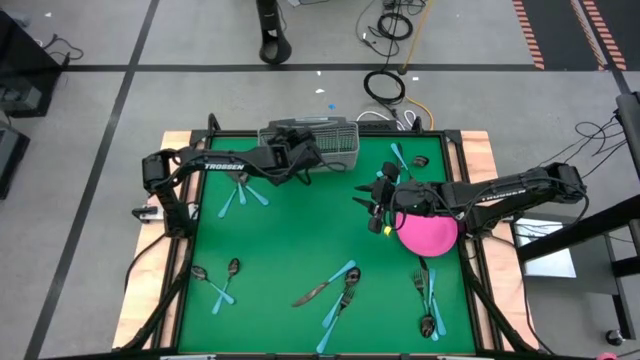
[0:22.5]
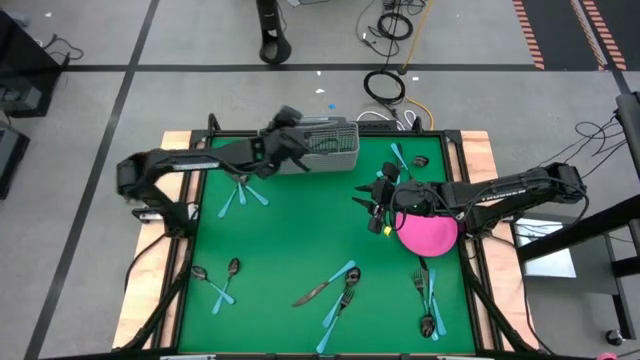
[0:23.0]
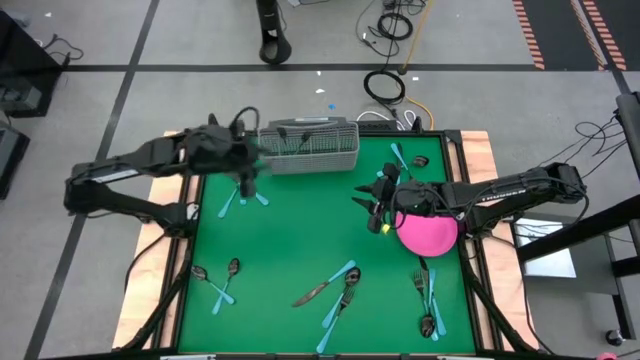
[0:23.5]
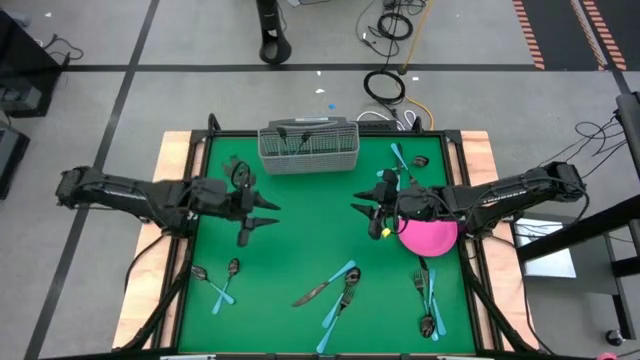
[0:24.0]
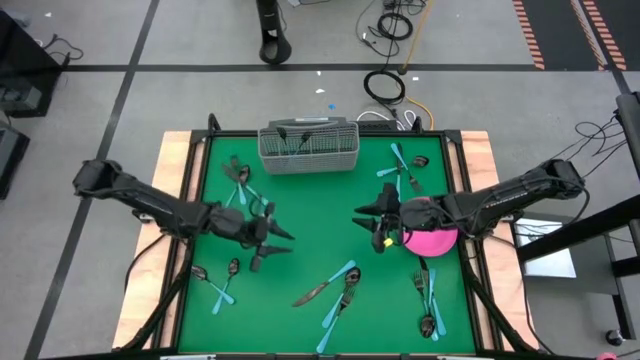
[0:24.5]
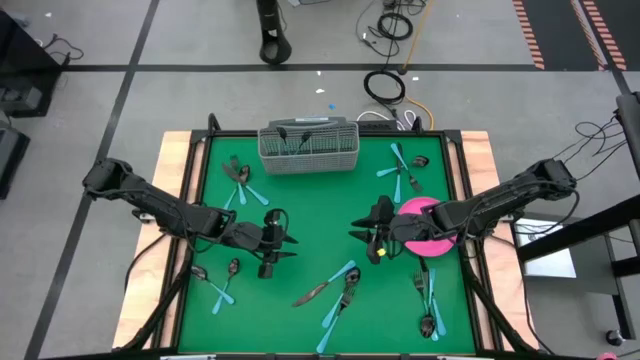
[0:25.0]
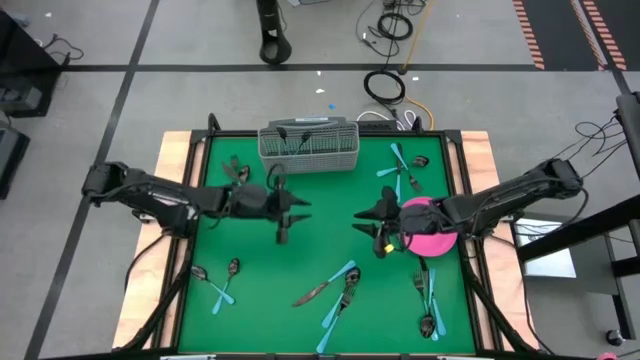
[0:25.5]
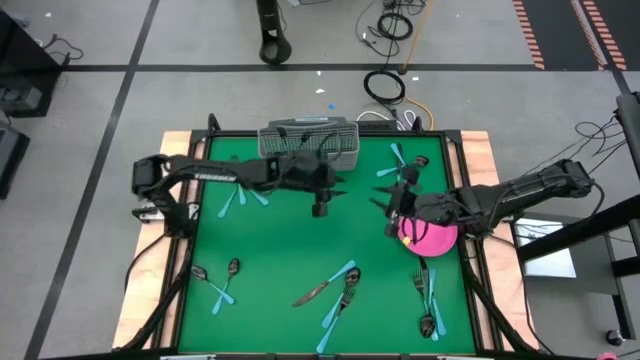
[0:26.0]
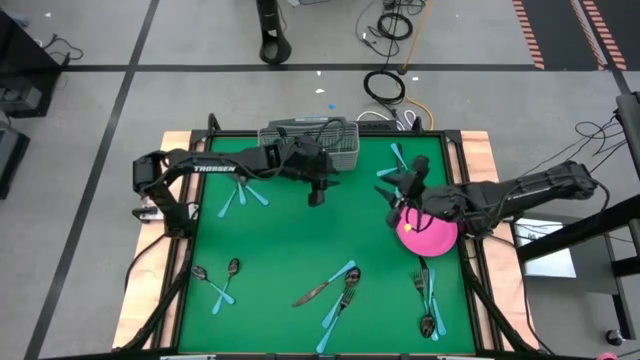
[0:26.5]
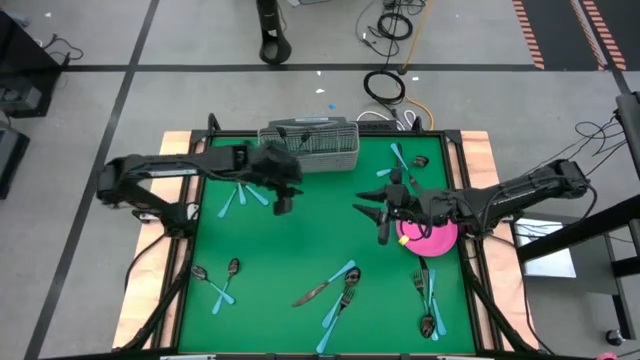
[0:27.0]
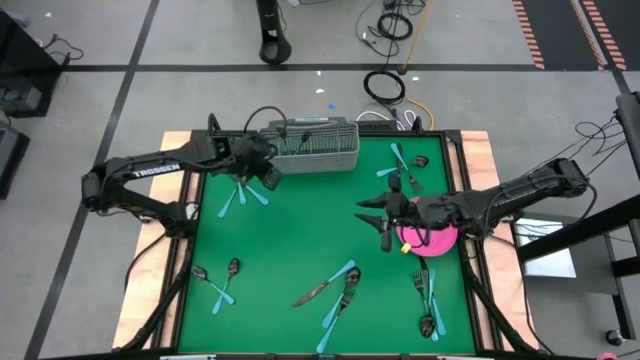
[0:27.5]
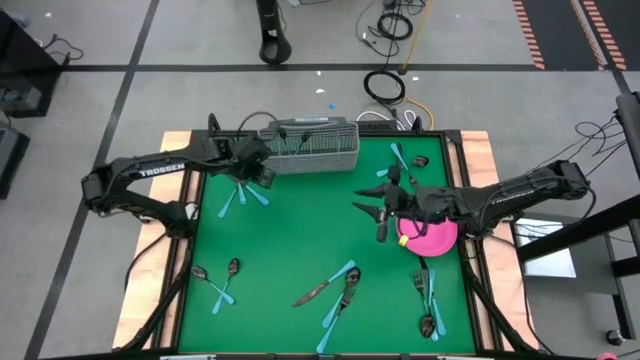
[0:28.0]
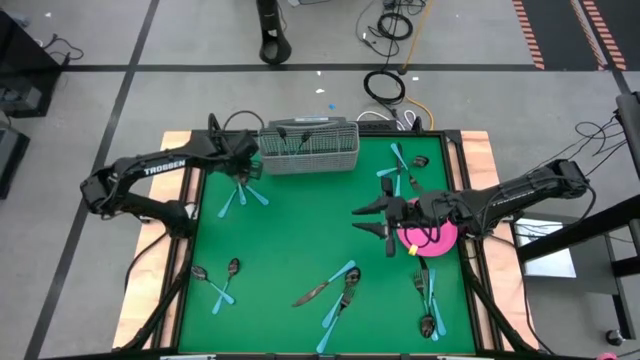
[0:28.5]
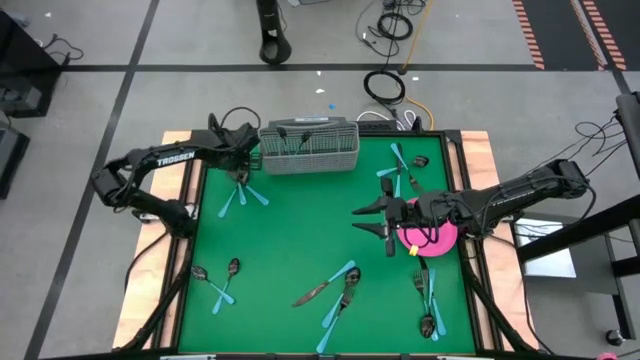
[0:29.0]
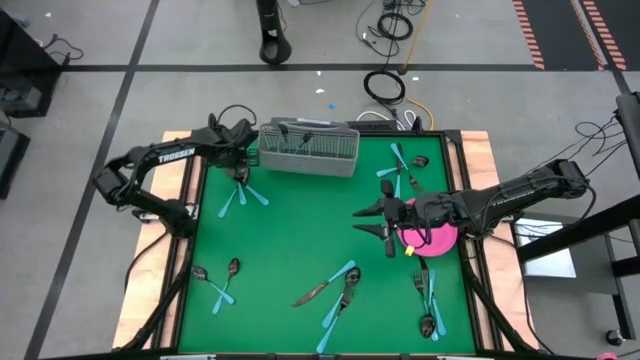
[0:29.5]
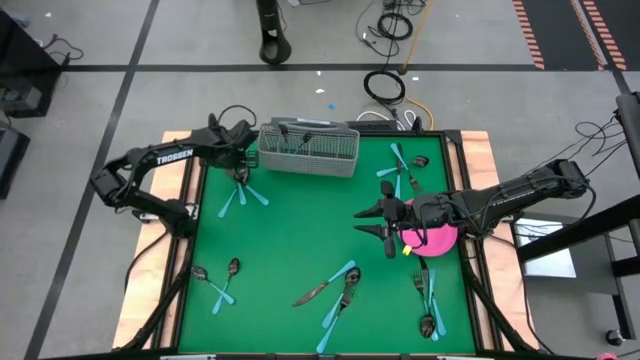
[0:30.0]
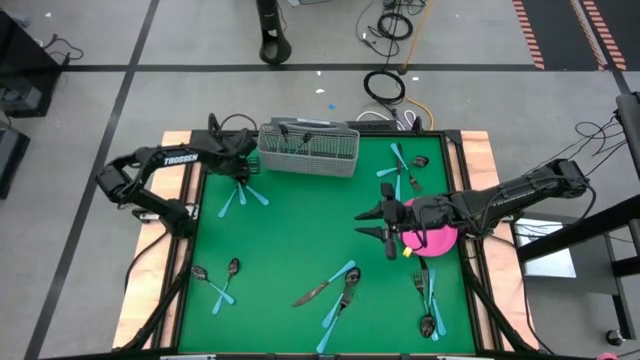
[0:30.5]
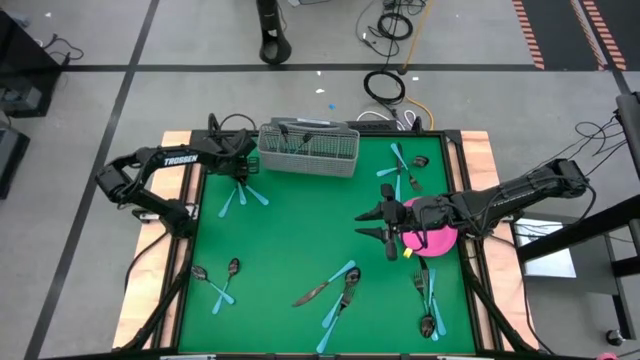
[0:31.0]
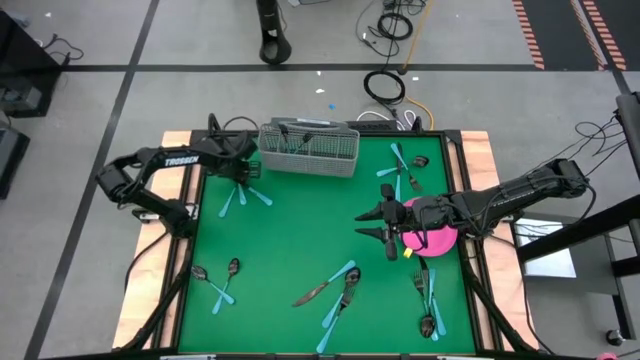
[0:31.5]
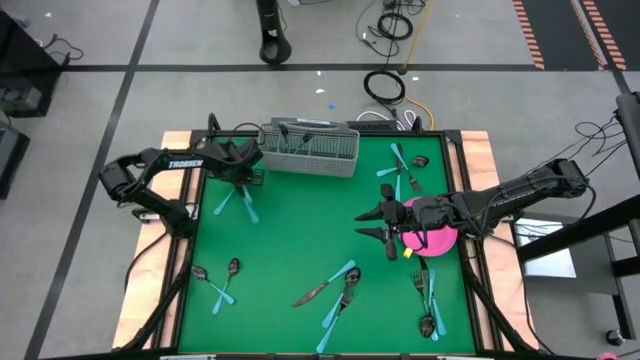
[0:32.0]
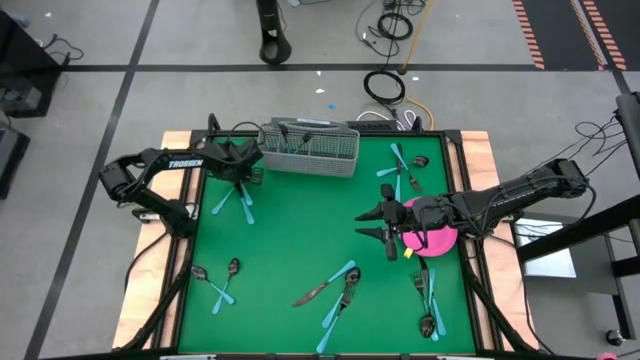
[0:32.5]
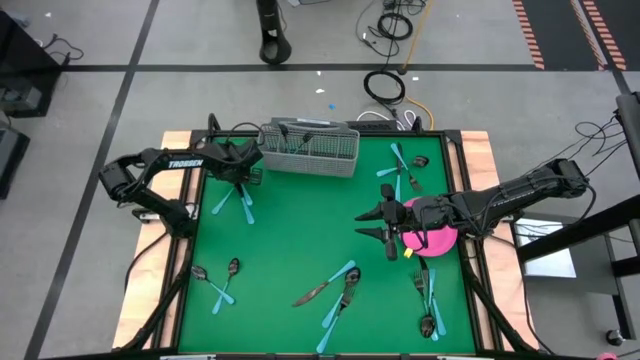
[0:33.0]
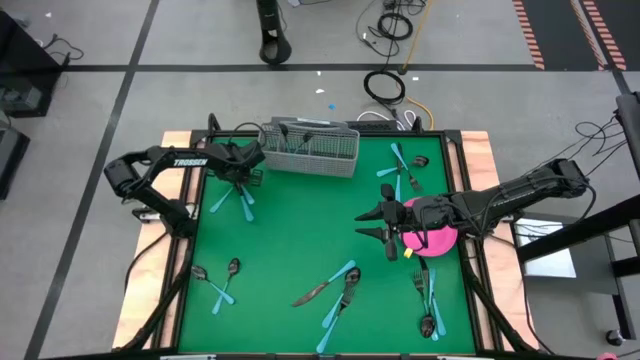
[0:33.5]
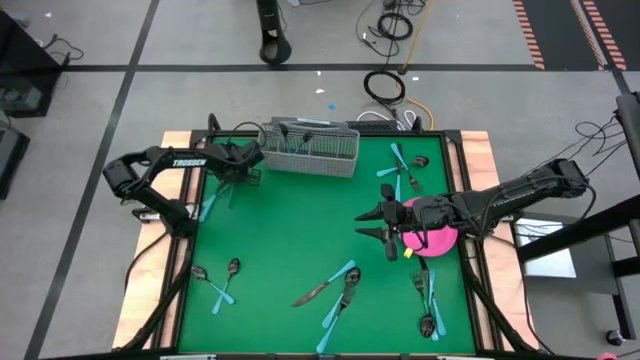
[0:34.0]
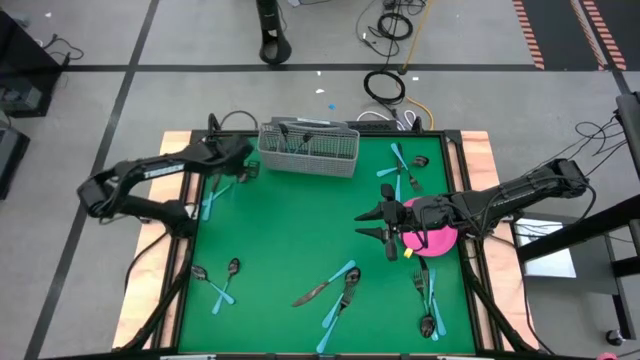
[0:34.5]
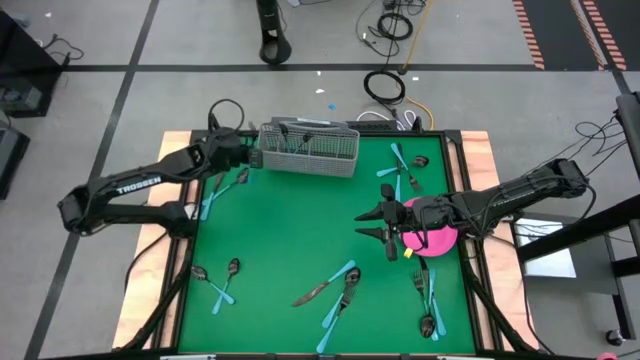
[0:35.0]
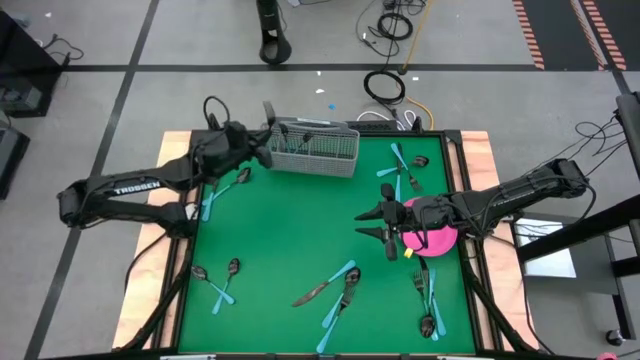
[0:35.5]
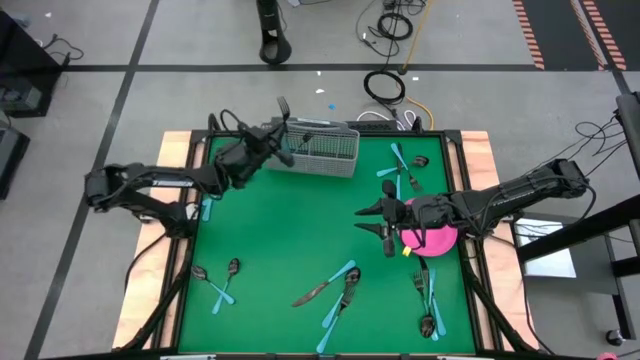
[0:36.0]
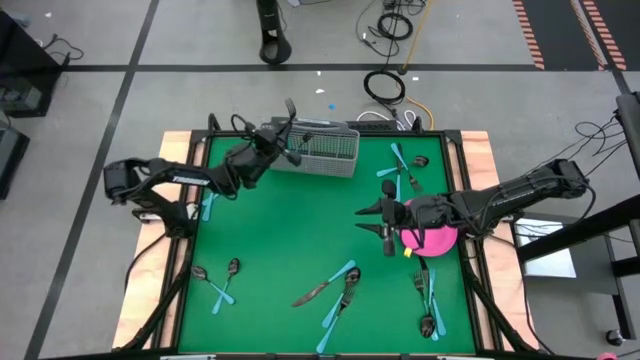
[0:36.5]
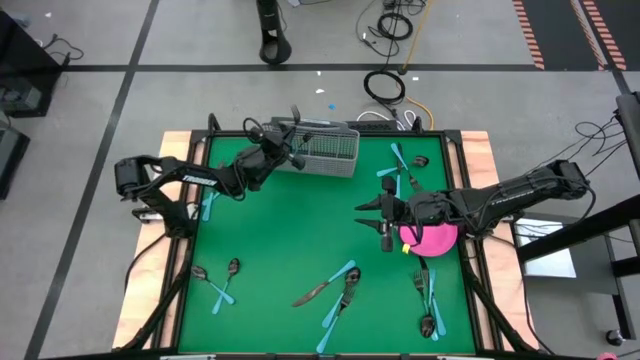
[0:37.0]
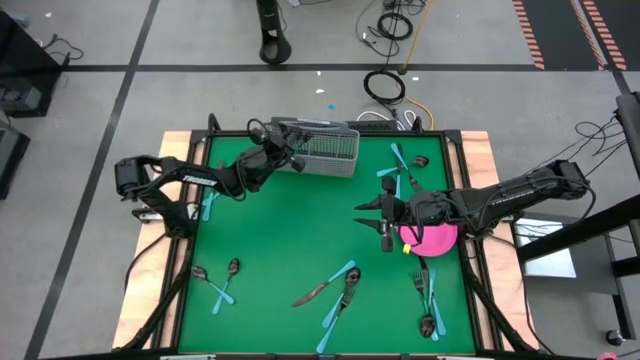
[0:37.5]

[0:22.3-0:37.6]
Task: Sort silverware
Put the blue fork into the silverware tray with the other blue forks

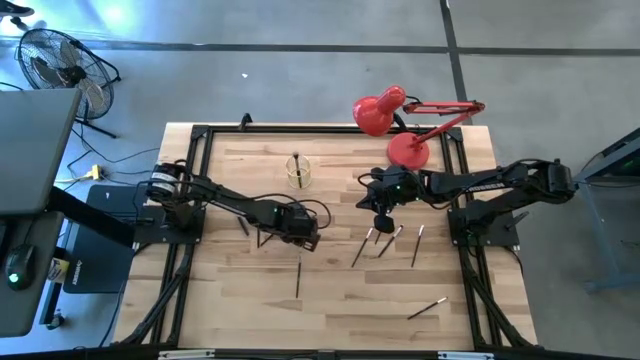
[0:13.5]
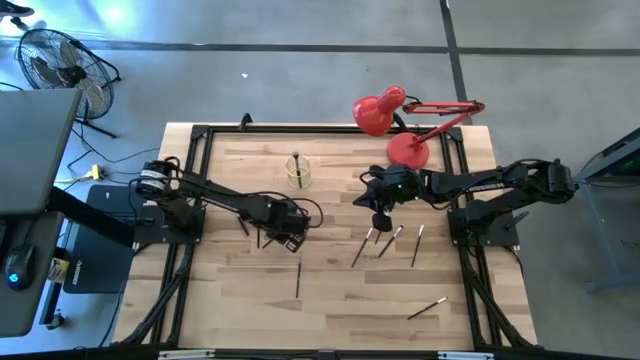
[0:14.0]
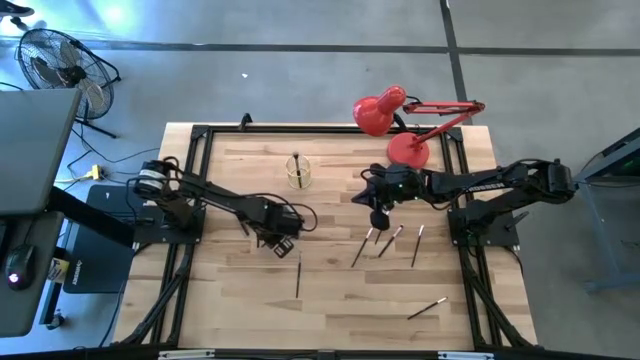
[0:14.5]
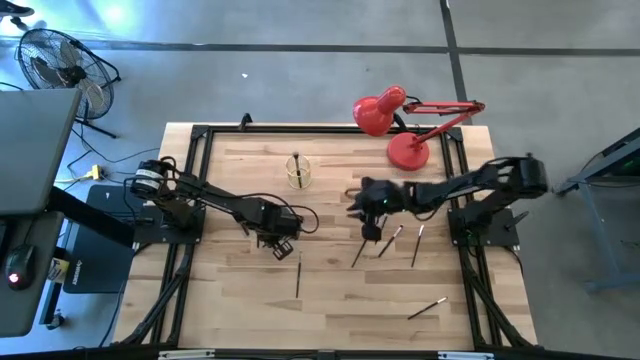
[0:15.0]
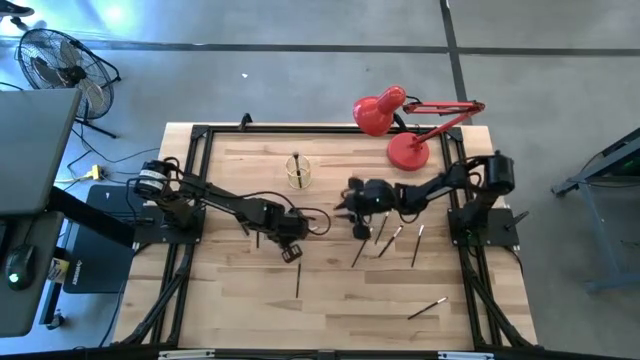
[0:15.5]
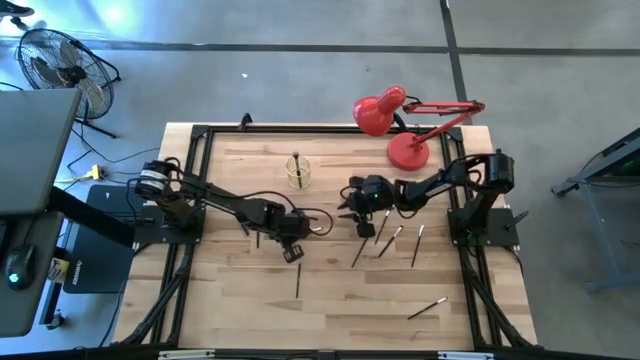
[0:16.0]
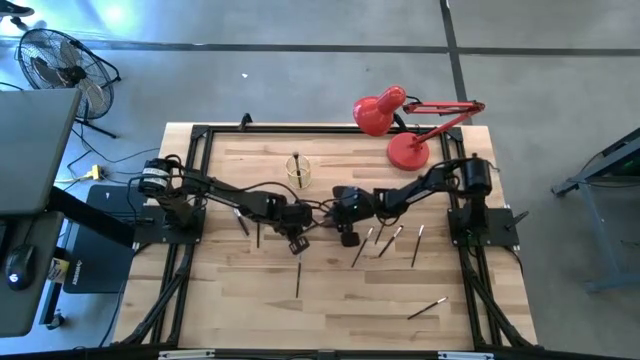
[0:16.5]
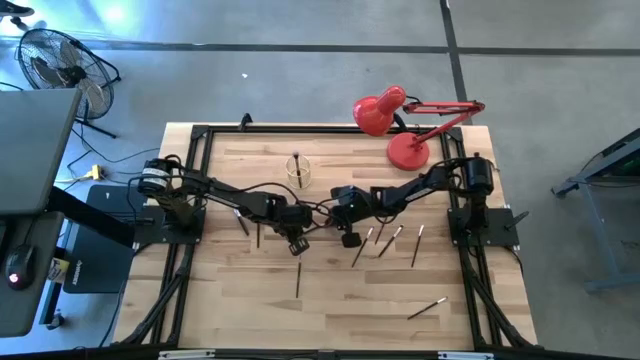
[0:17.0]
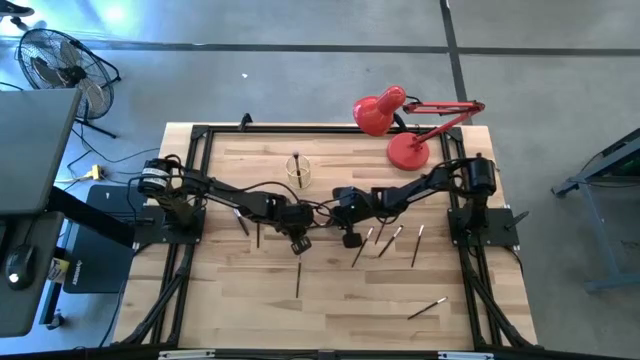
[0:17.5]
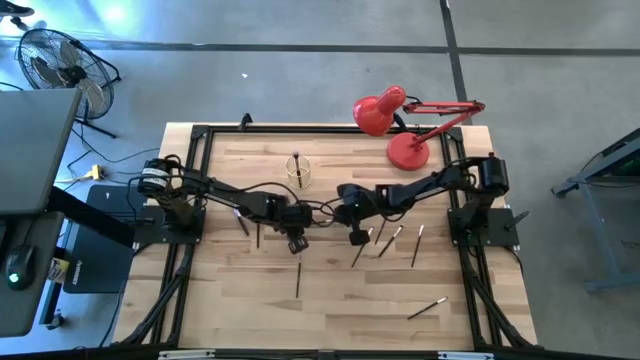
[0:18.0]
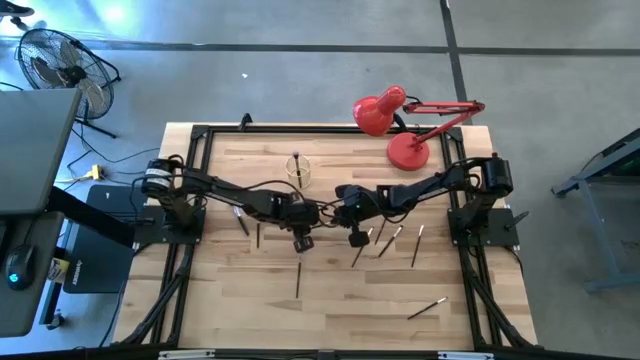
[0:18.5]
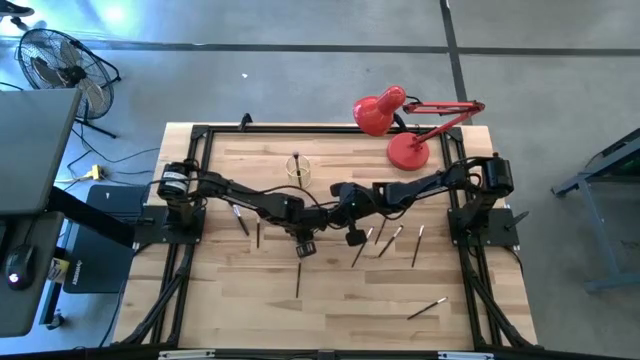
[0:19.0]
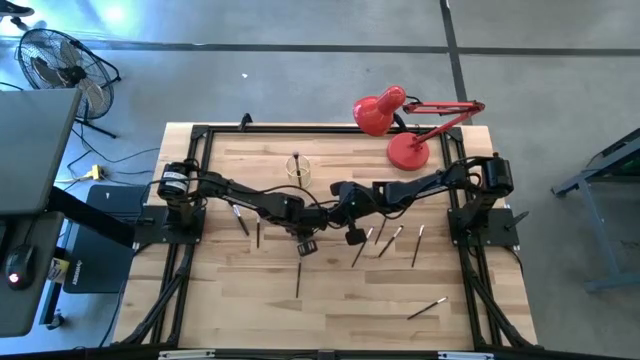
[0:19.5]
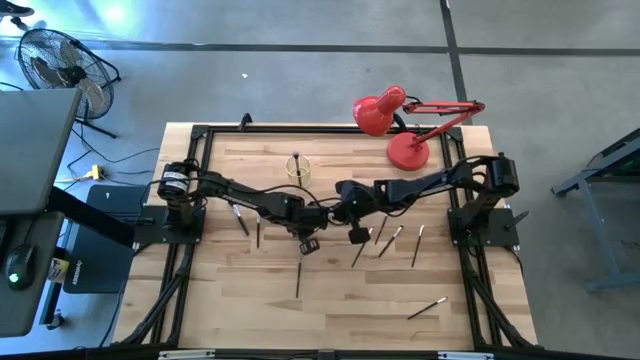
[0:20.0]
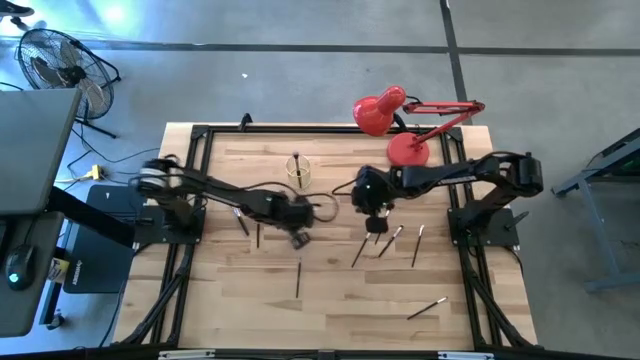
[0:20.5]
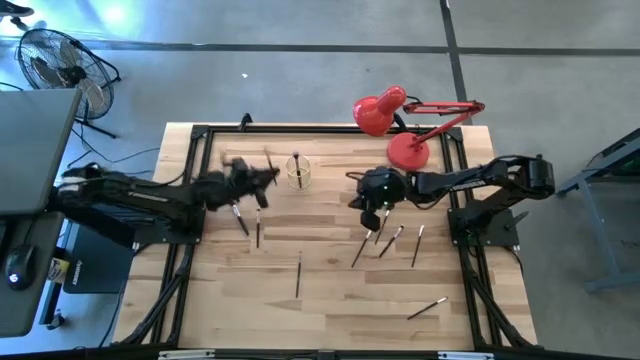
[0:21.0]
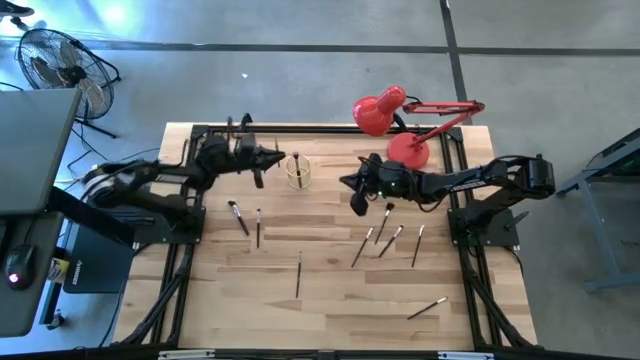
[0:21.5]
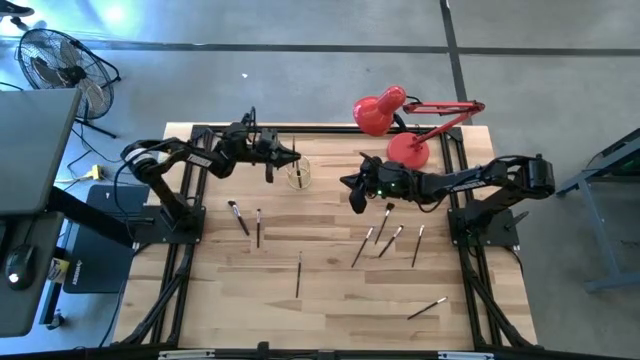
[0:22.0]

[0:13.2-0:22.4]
Task: Put items in baskets/containers
Put the top eyeliner brush into the wire organizer
